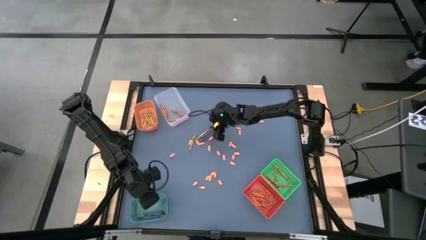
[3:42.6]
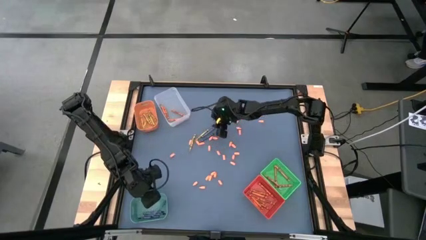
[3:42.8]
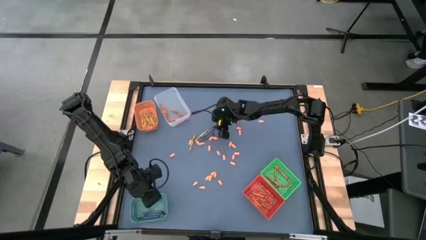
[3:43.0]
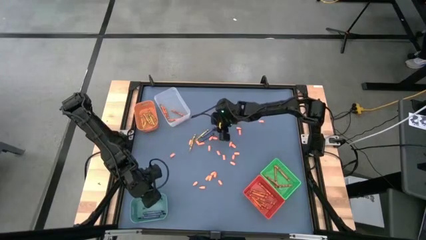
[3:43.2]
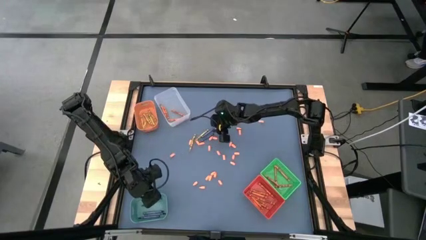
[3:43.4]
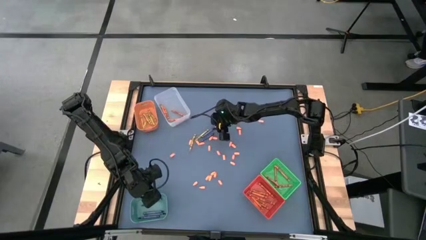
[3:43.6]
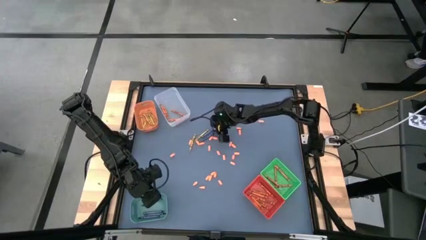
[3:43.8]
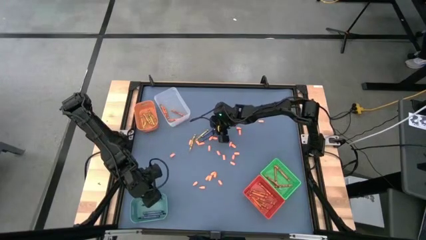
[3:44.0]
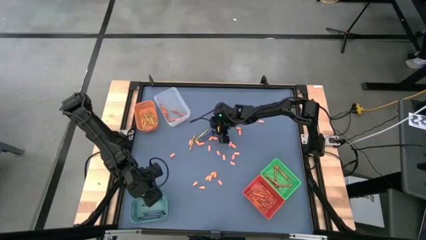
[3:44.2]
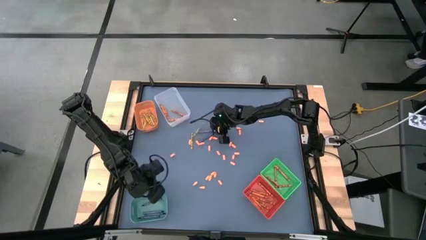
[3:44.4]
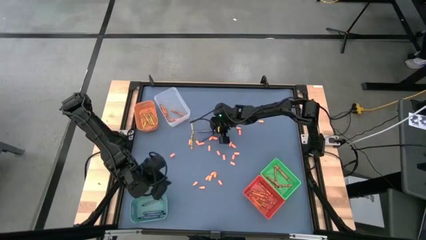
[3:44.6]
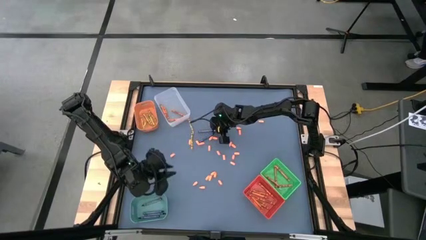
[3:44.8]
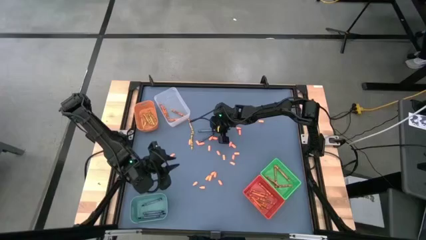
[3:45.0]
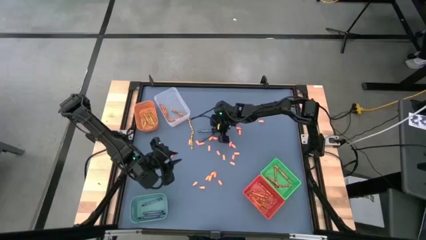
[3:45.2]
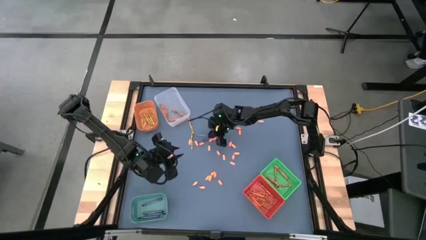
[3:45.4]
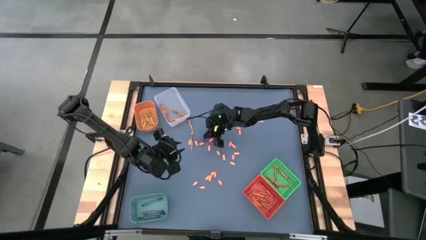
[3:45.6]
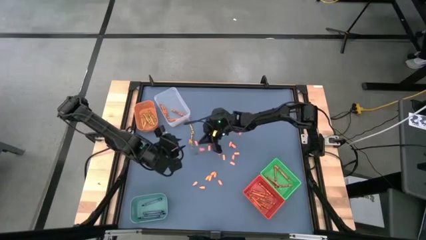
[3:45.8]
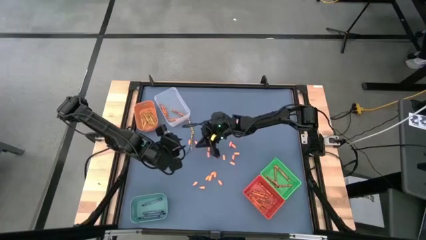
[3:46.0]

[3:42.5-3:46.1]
Task: Sort crayons
Put the blue crayon into the blue bin

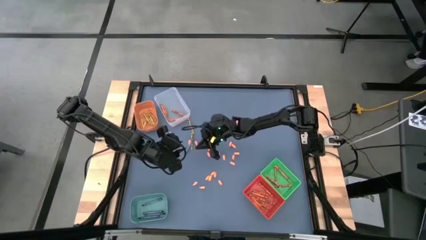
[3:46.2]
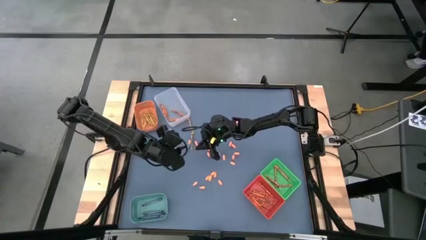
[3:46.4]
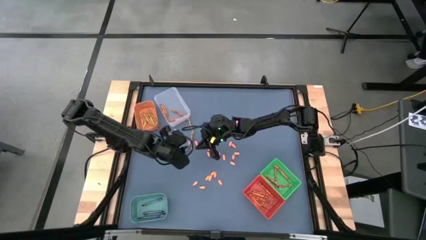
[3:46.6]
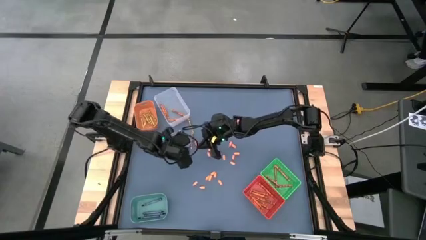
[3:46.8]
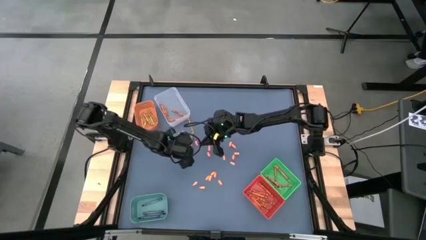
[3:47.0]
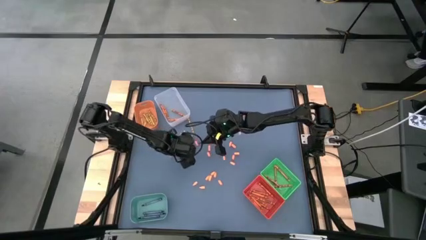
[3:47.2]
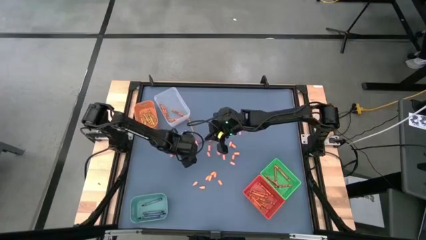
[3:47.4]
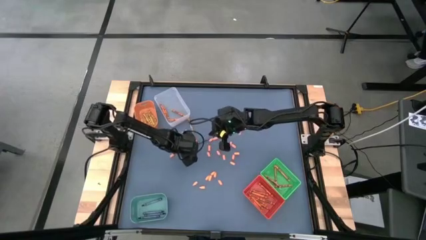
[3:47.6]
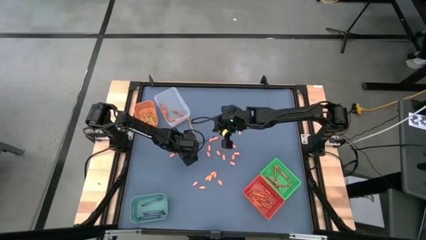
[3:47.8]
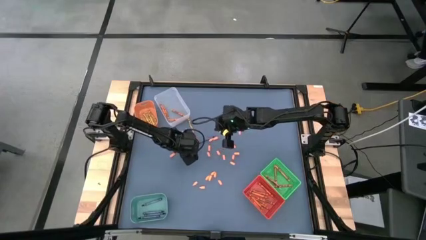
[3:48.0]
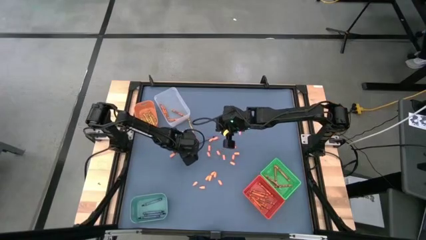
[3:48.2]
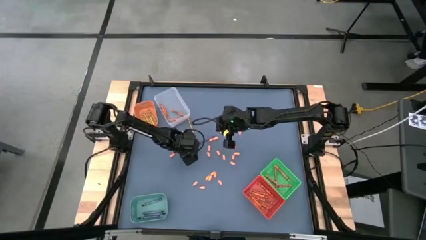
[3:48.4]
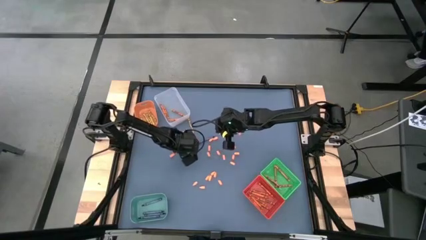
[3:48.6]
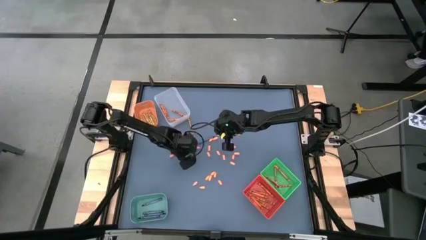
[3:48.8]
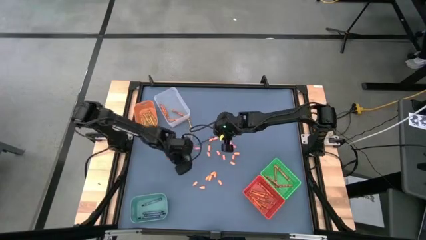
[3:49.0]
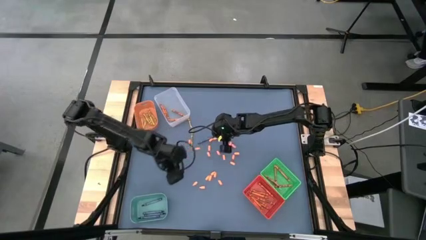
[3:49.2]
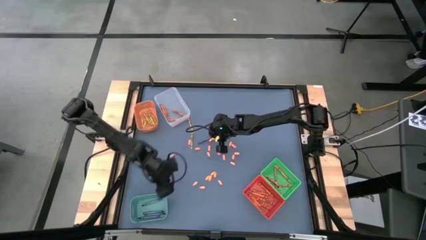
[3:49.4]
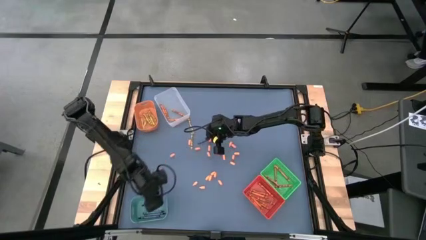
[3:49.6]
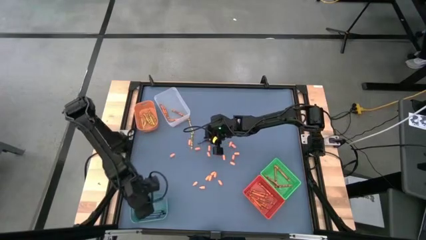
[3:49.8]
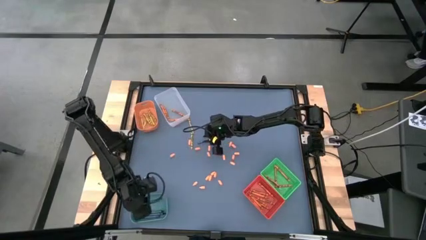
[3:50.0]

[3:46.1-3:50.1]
Put the blue crayon into the blue bin

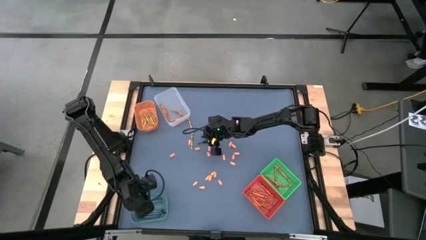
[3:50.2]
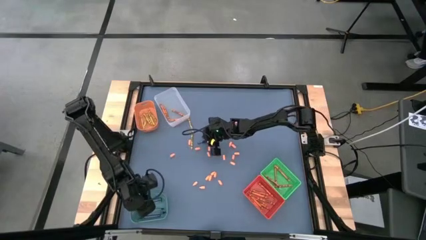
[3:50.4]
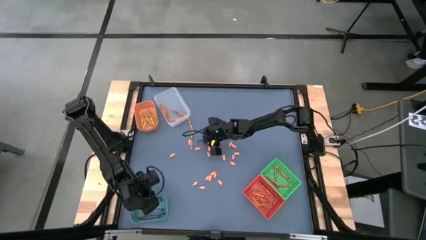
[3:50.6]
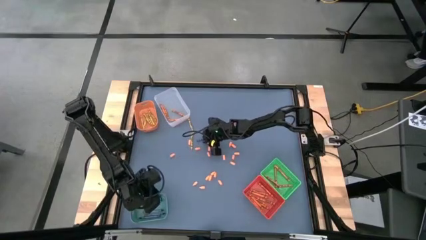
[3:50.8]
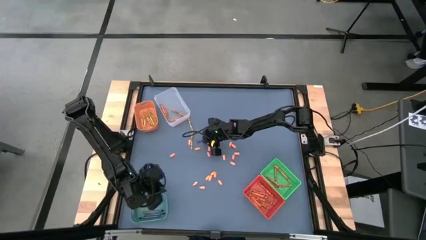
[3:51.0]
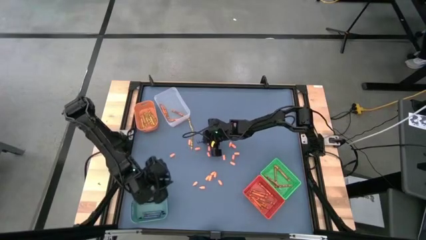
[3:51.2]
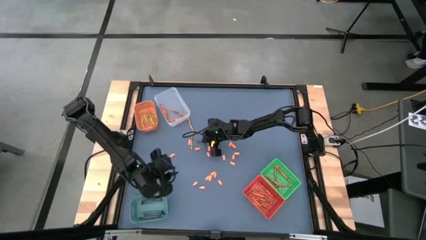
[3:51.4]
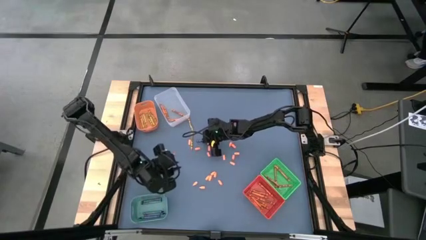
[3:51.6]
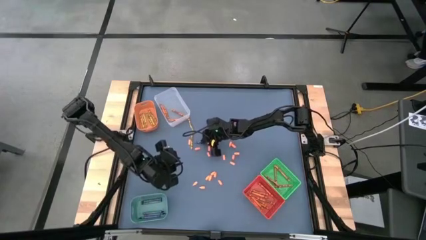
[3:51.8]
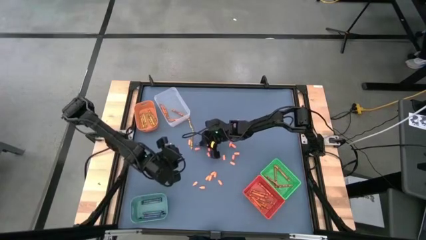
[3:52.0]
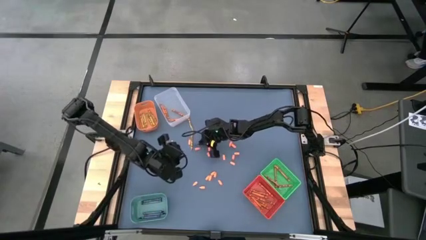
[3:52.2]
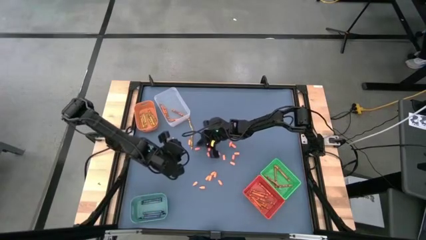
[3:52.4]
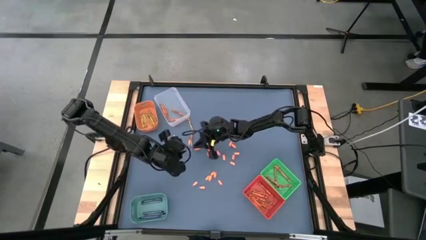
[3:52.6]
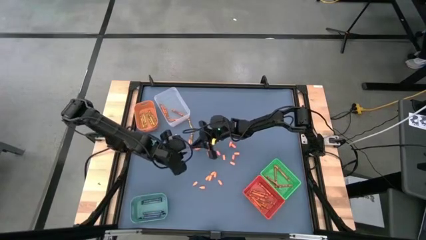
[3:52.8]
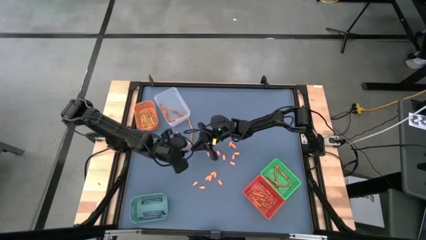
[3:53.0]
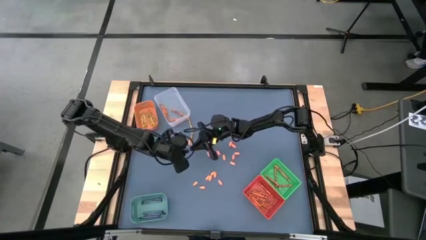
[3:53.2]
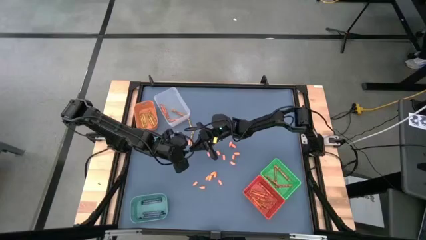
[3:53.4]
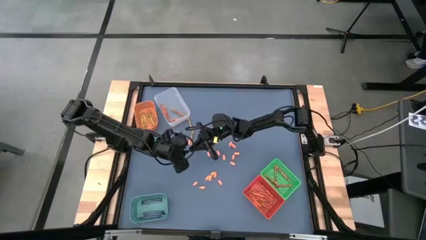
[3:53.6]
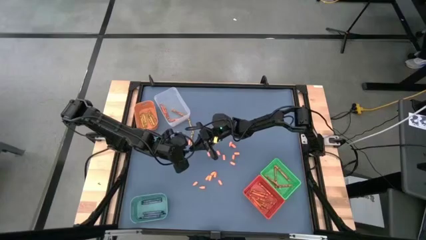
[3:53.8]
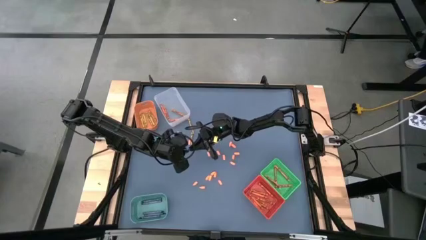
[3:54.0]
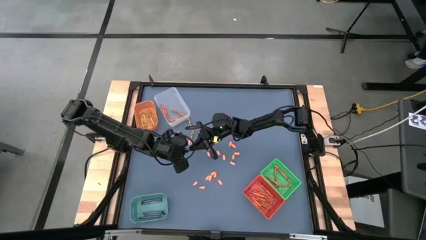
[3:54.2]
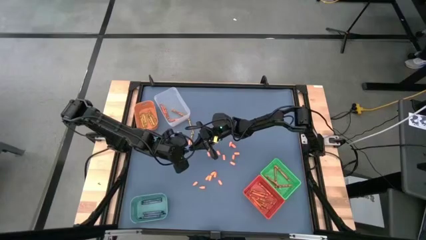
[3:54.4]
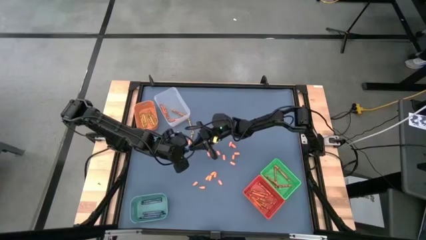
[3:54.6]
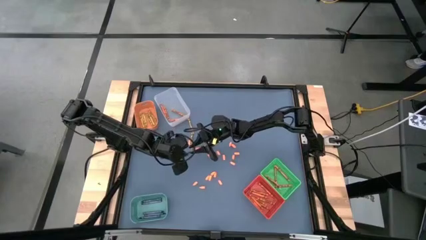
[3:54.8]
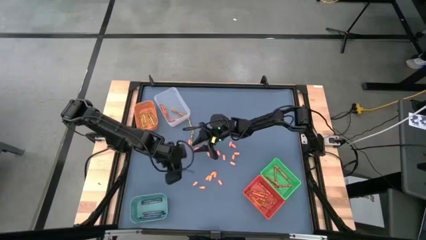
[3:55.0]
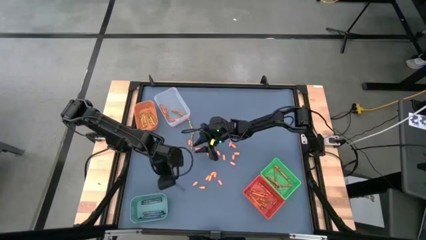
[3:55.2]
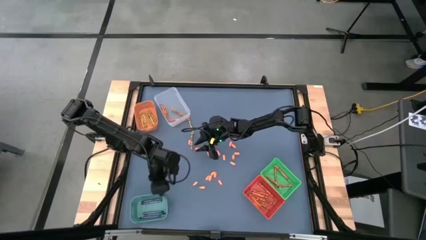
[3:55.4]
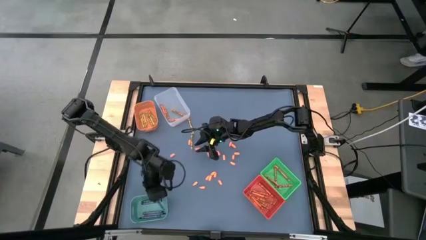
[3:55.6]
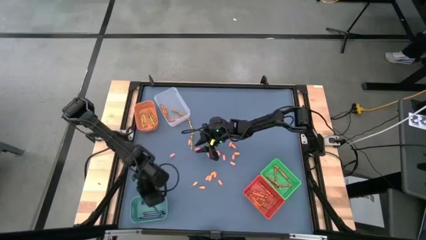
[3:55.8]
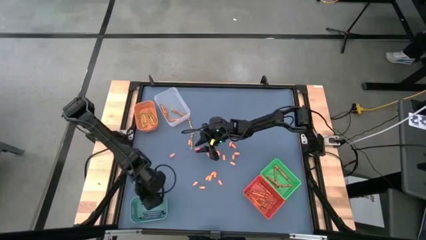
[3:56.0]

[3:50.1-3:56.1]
Put the blue crayon into the blue bin

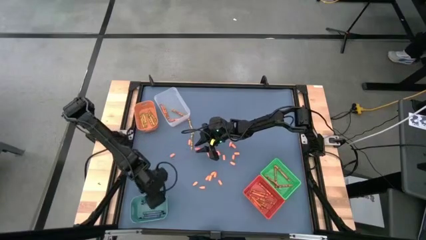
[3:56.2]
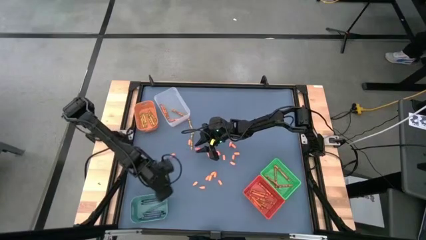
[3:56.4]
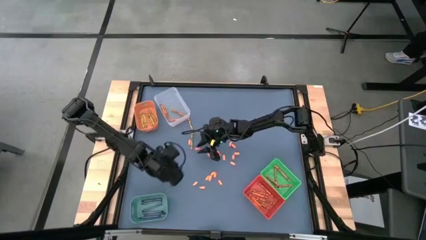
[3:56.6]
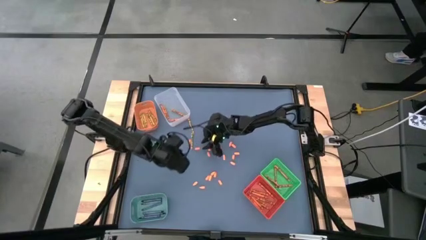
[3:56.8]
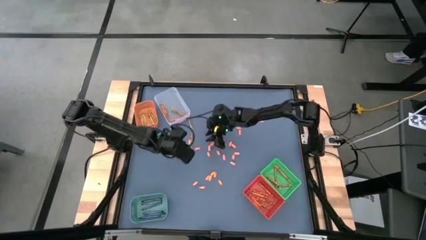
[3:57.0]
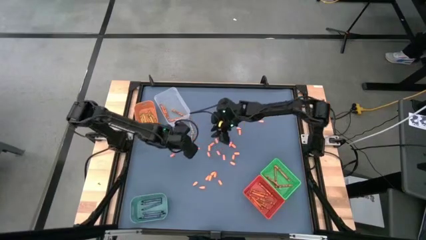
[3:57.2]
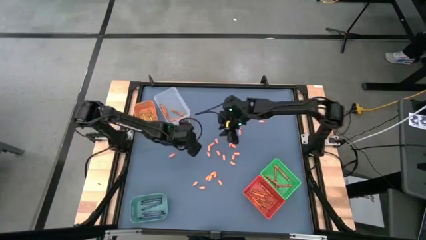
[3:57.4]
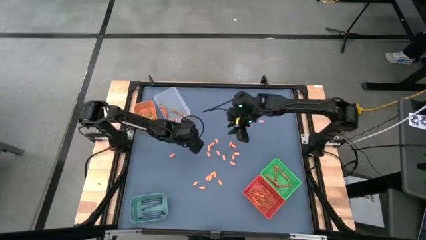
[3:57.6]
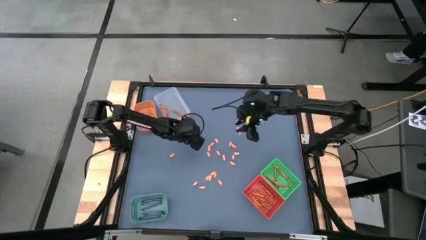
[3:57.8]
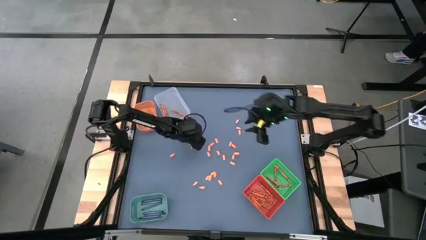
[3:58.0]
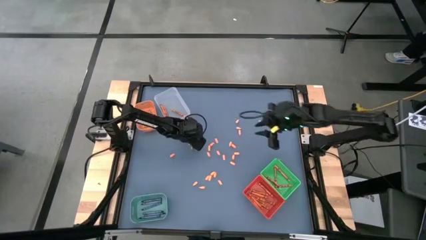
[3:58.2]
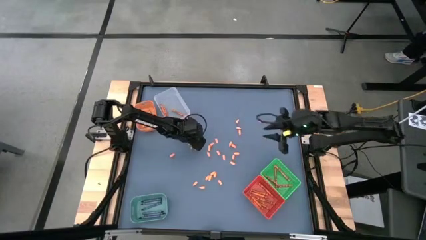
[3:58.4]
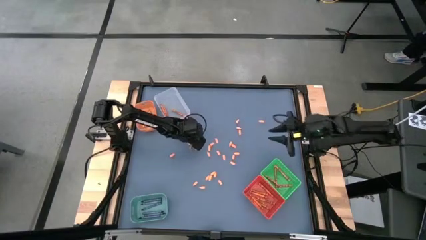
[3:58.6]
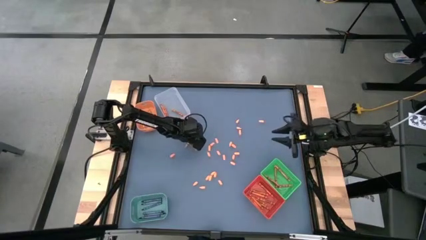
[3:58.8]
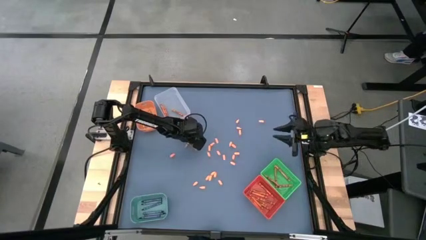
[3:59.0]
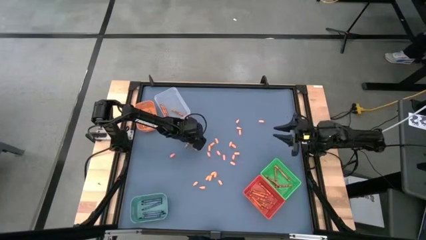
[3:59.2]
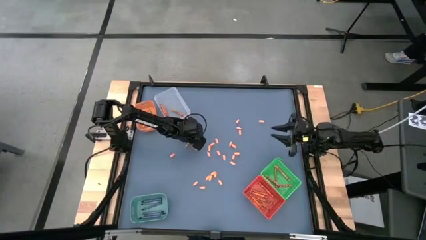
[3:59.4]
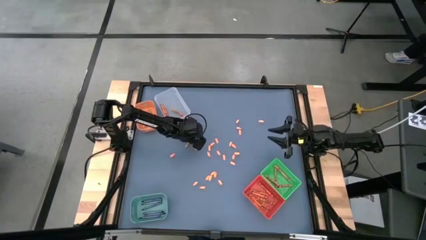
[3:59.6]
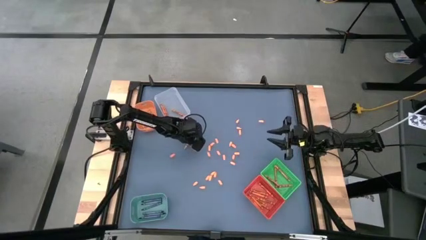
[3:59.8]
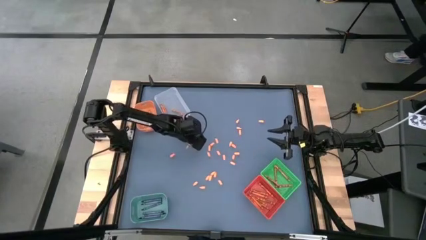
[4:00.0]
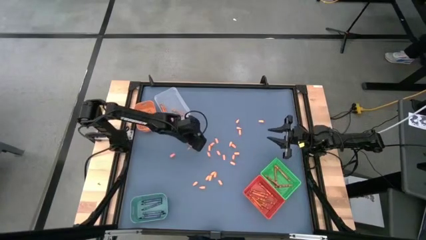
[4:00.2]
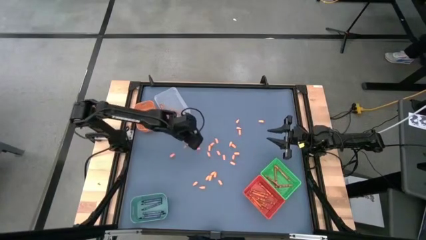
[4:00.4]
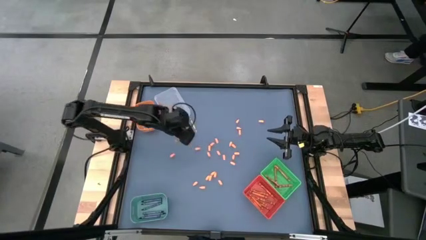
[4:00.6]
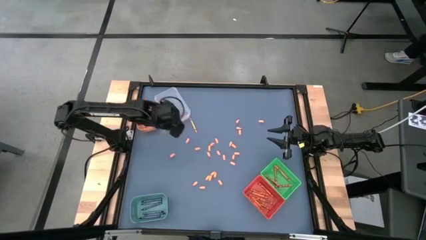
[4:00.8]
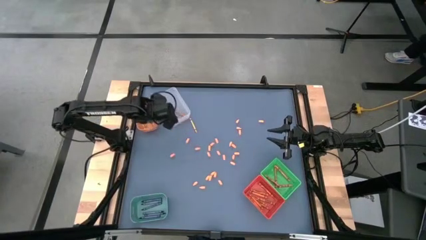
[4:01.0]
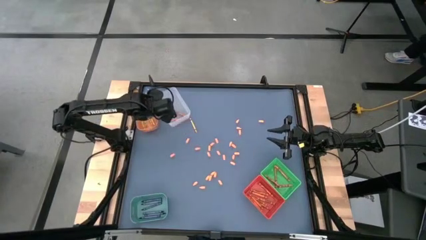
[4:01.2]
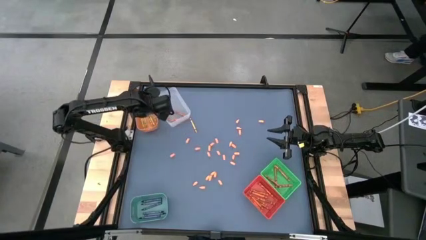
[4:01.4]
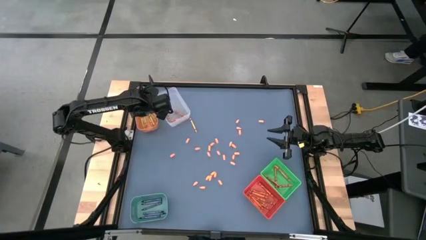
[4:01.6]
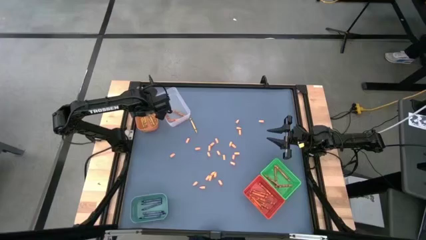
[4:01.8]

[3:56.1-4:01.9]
Put the yellow crayon into the orange bin
